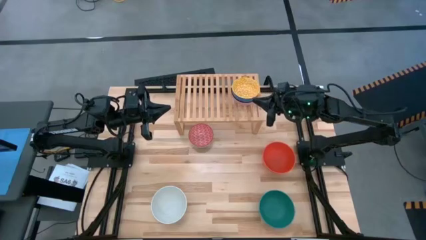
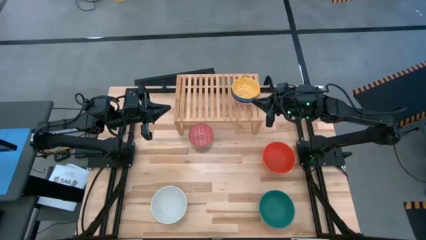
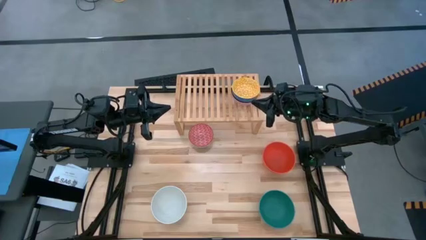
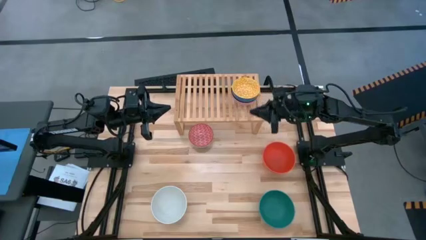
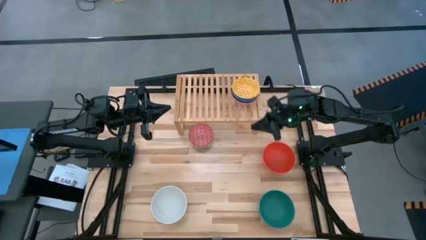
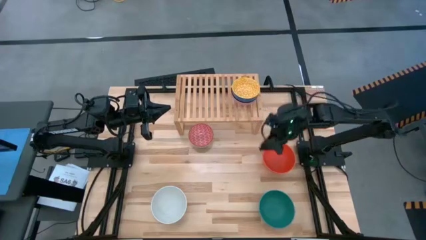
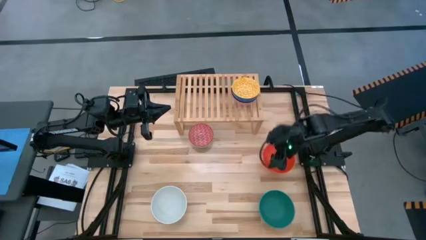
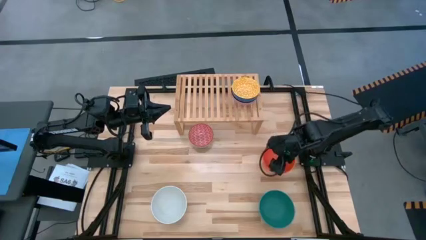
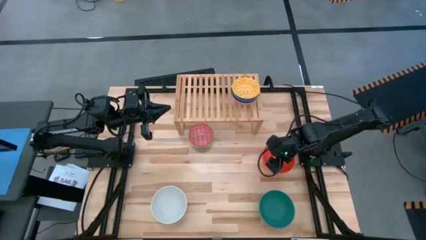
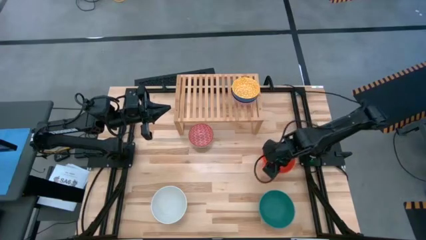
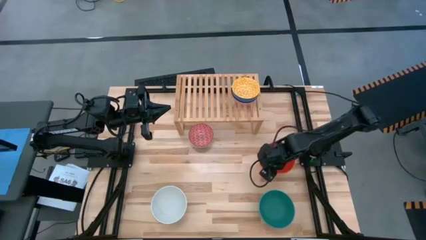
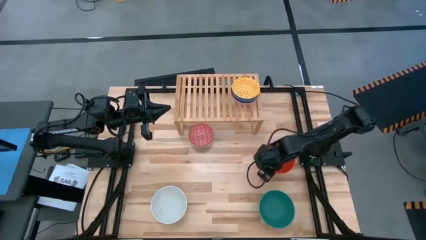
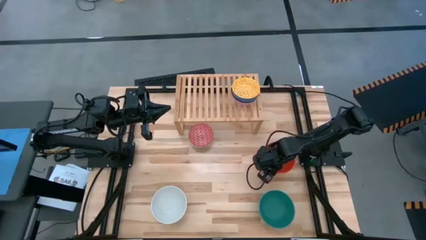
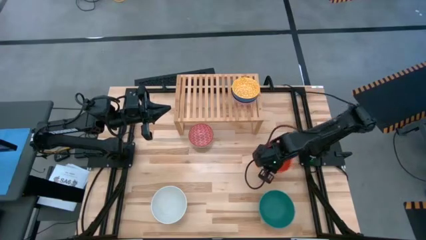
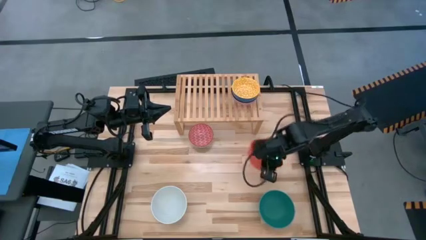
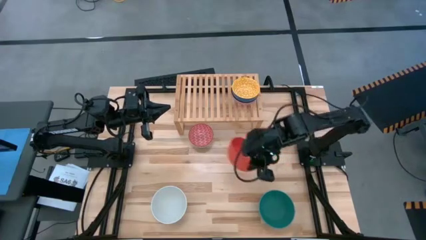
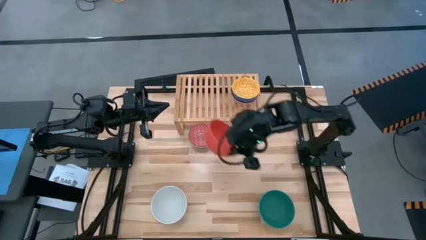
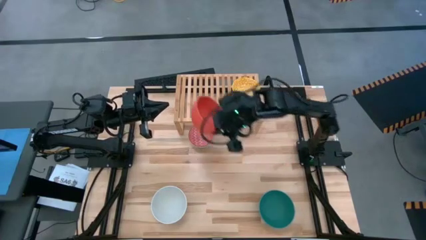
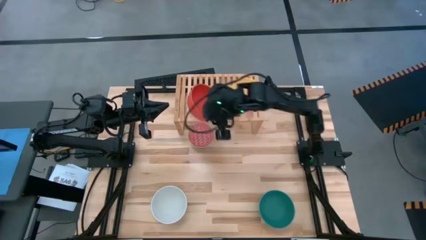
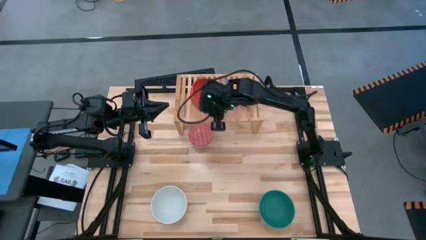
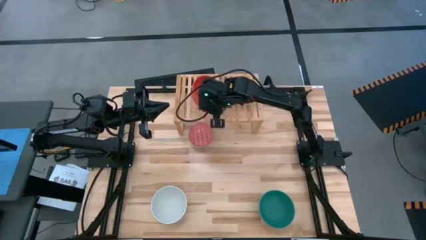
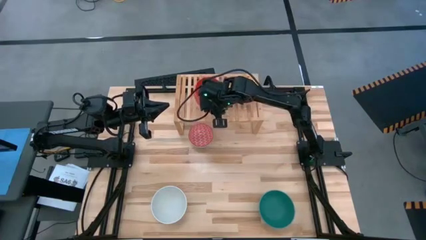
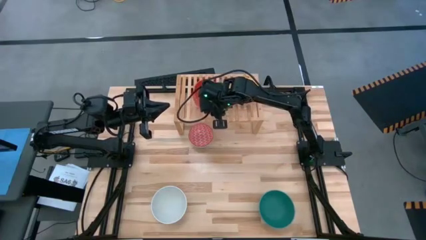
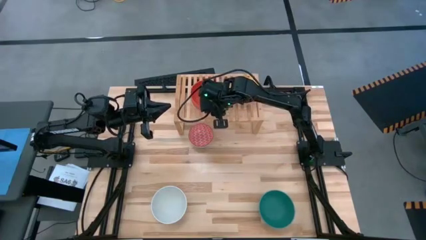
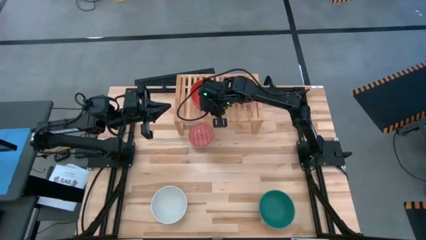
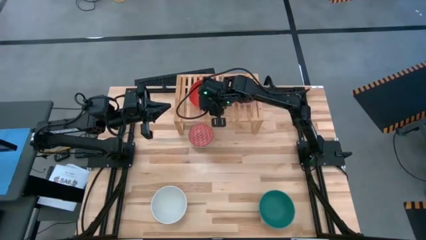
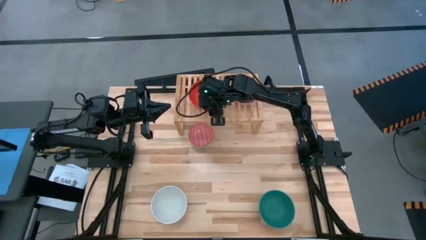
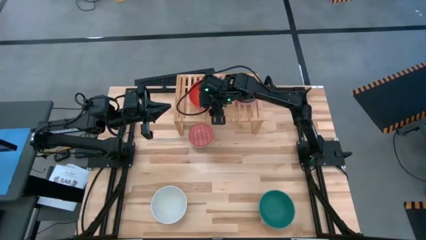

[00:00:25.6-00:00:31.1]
Task: Place and stack bowls onto a shelf
Put the big orange bowl on the shelf

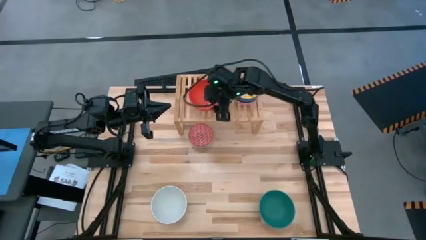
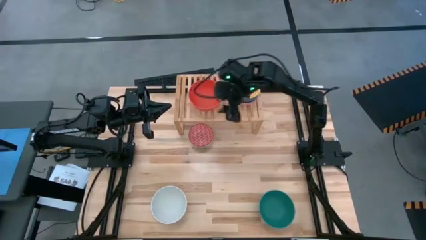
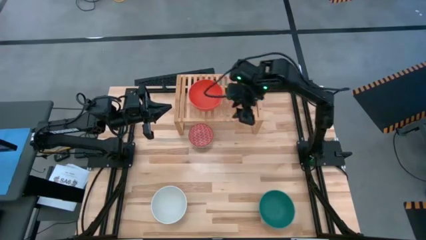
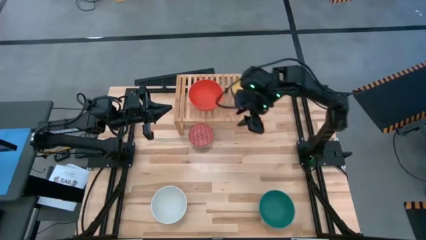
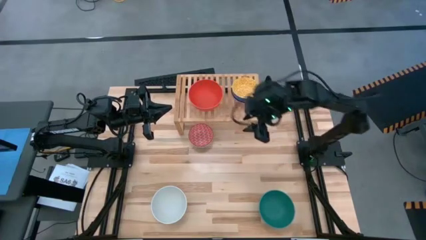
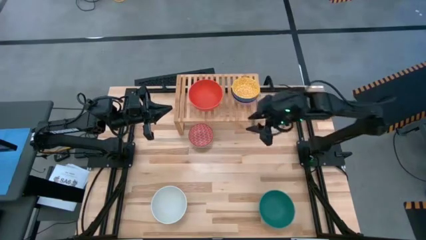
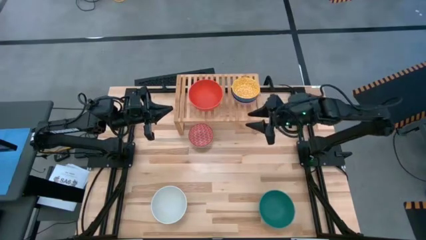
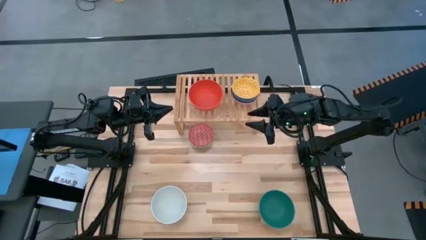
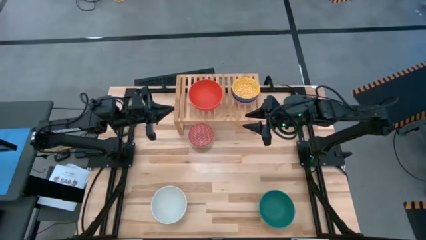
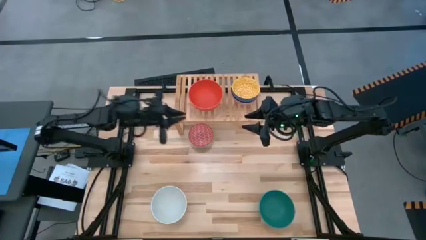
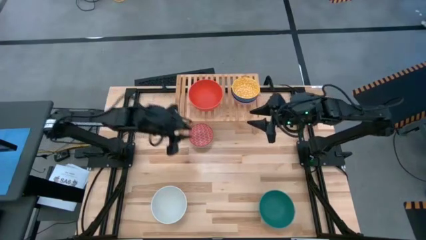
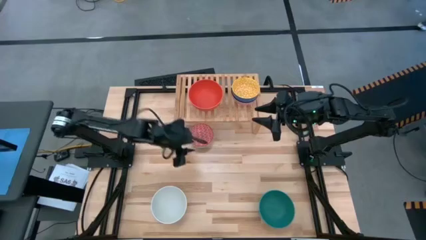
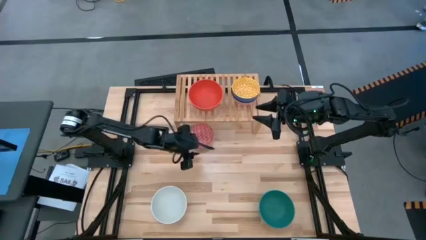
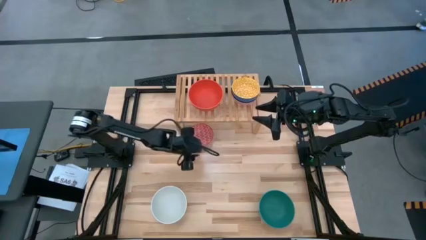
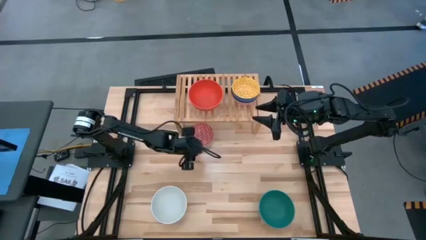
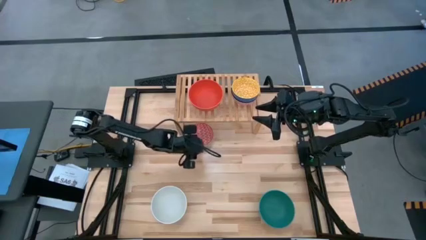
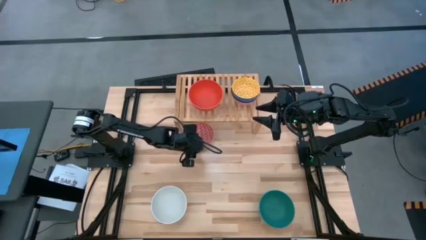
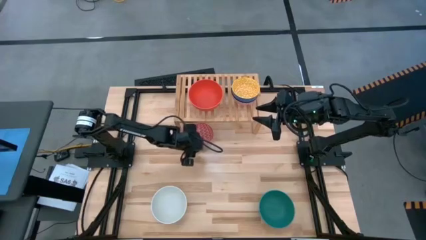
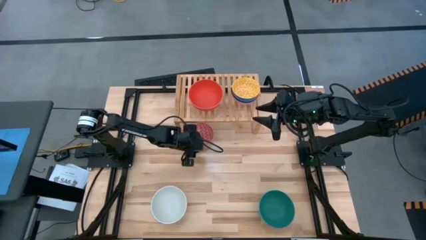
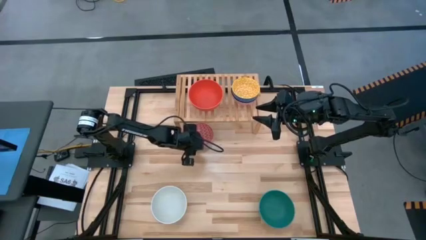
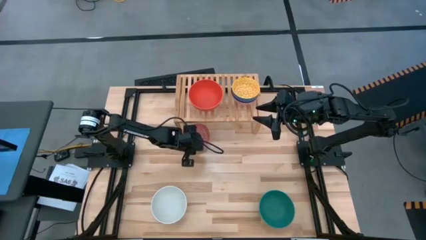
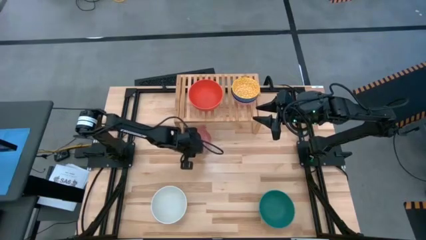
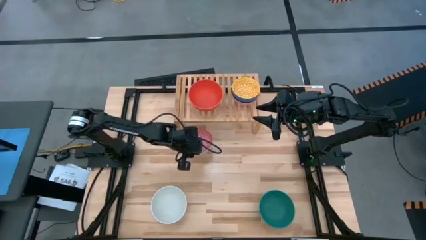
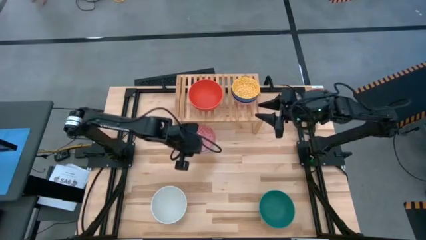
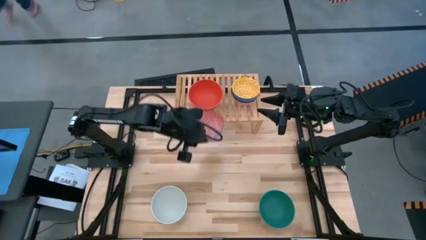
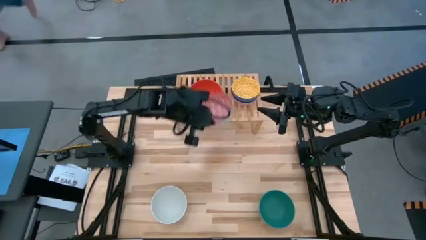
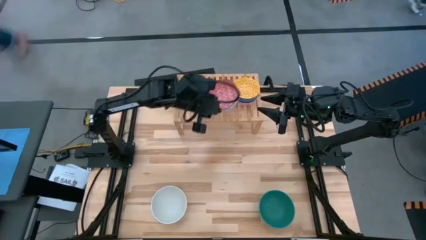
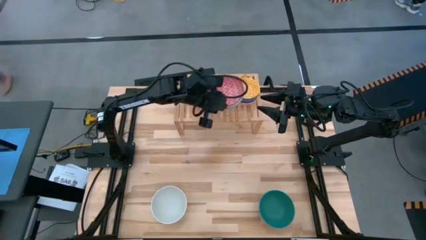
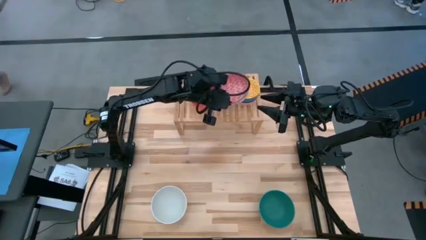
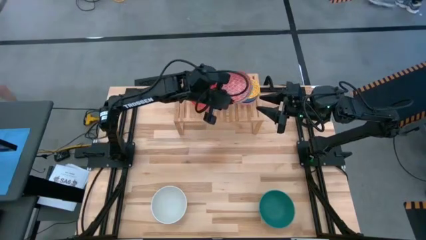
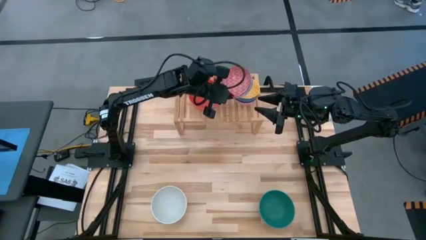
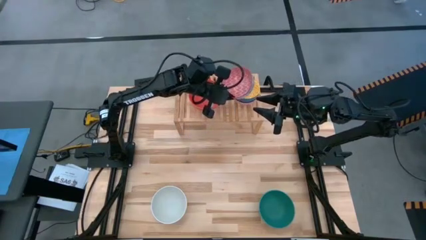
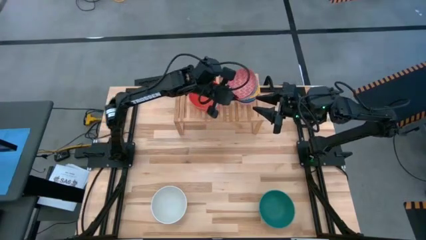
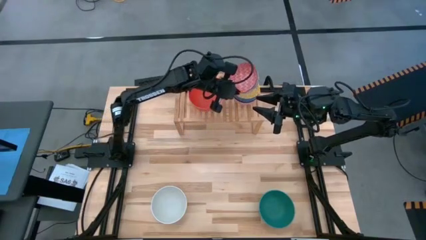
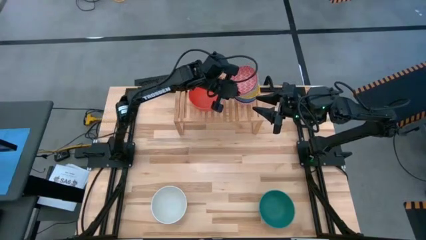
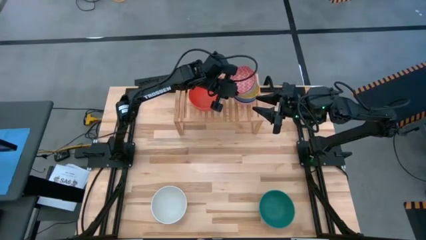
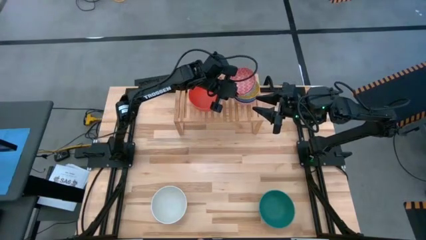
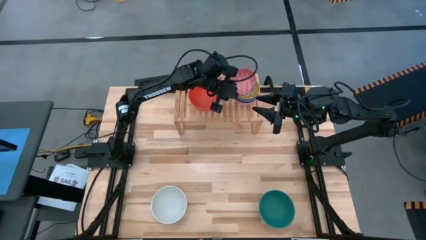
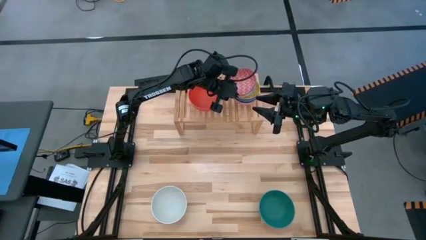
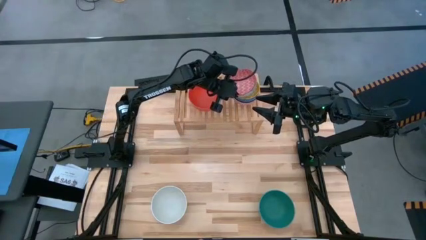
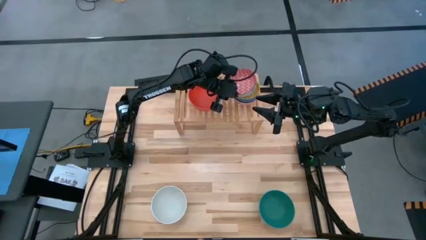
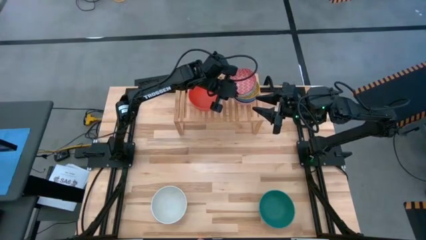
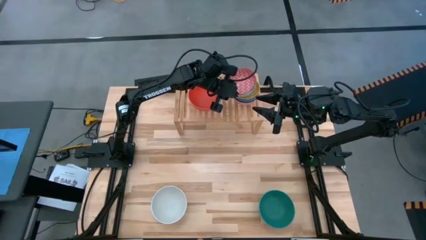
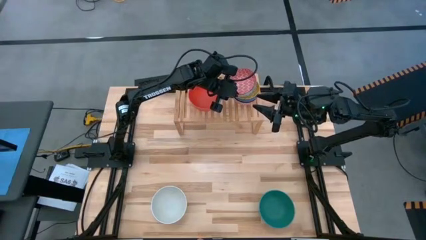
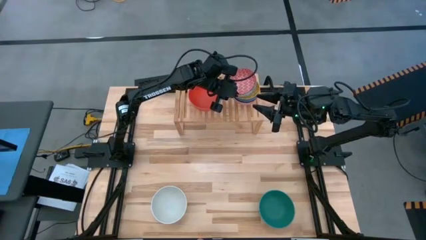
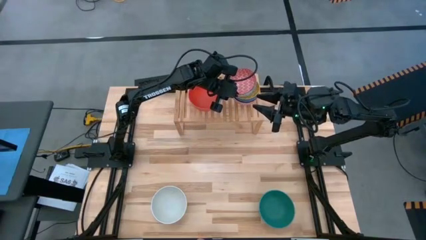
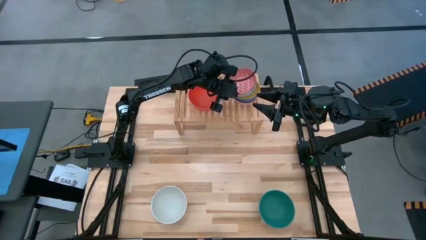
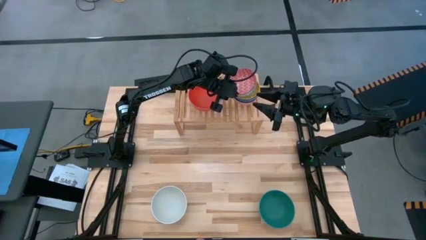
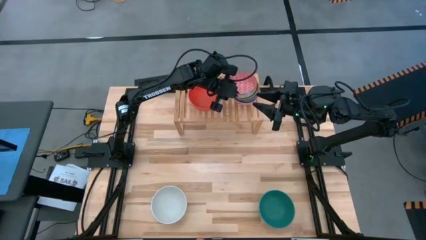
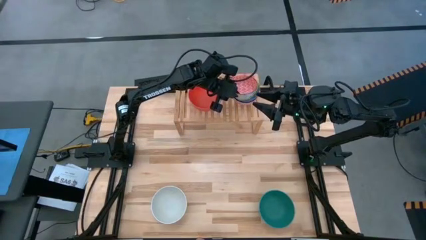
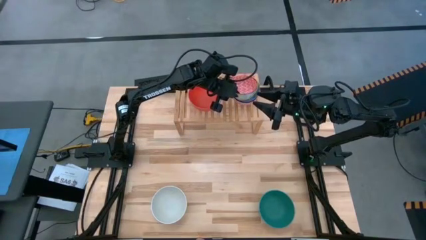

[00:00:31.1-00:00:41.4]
Stack the small red bowl on top of the other small yellow bowl on the shelf
